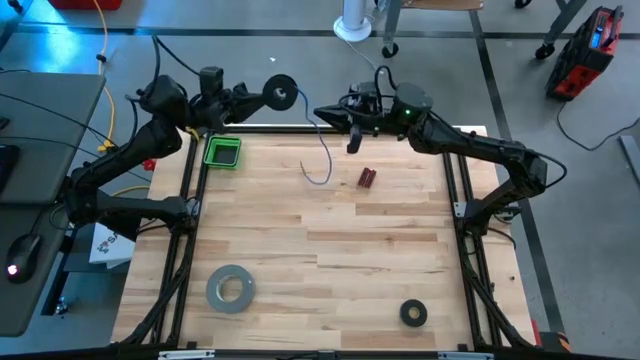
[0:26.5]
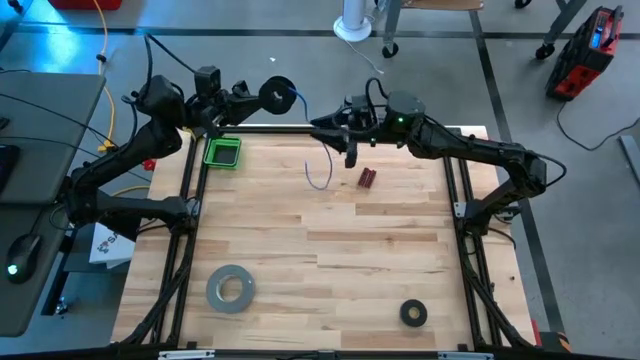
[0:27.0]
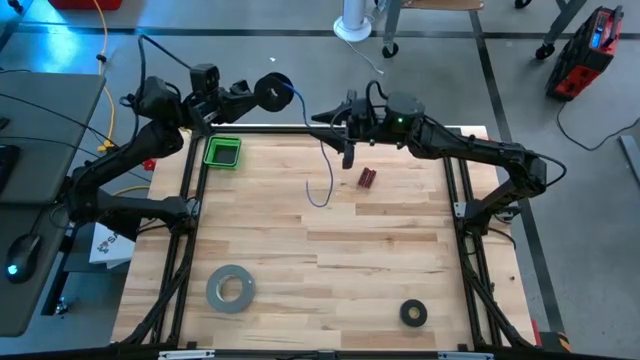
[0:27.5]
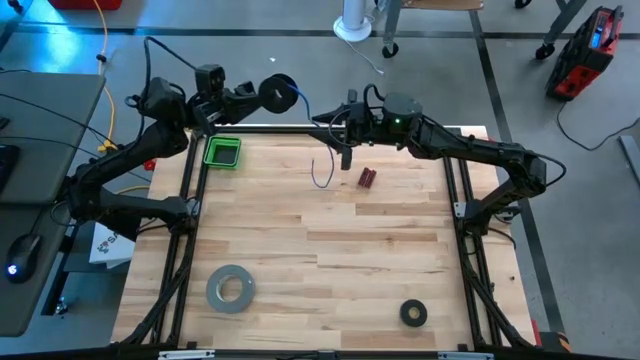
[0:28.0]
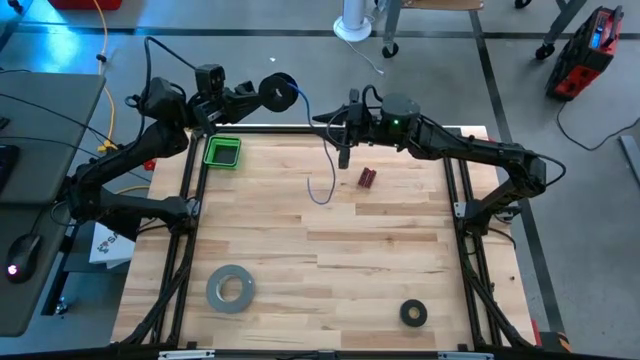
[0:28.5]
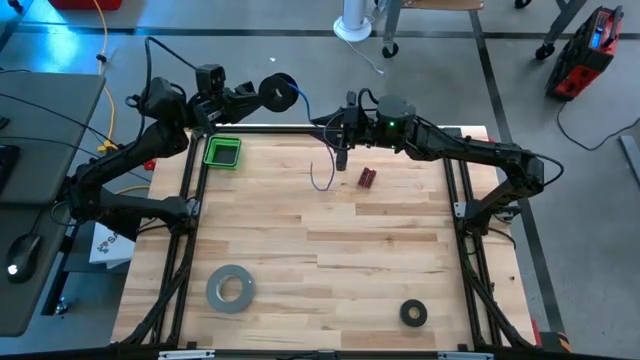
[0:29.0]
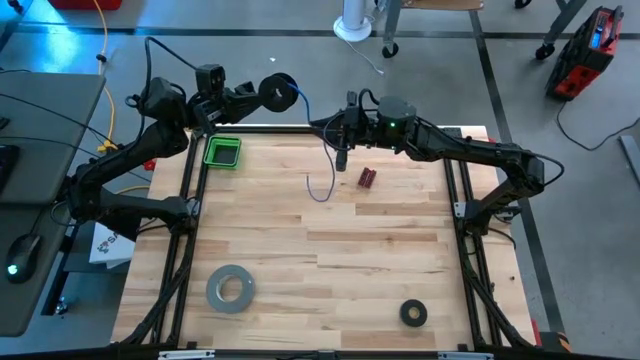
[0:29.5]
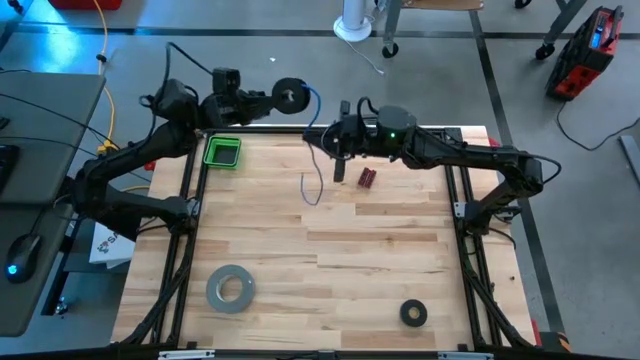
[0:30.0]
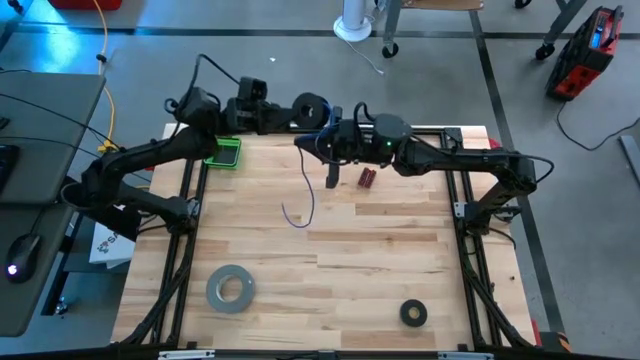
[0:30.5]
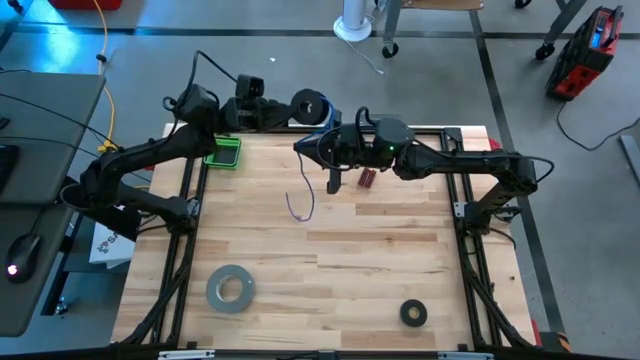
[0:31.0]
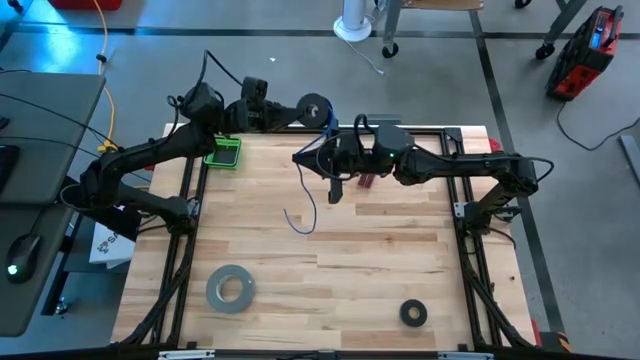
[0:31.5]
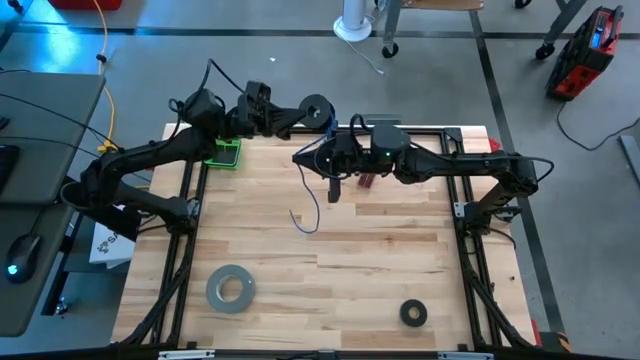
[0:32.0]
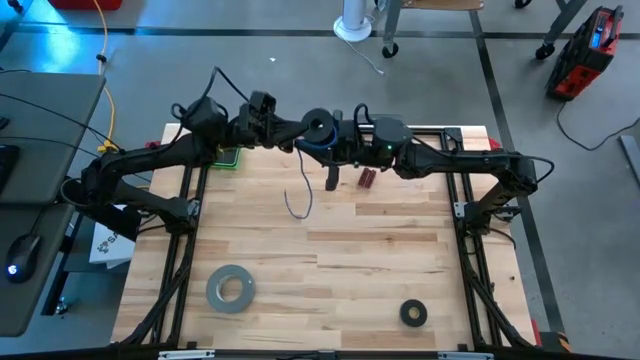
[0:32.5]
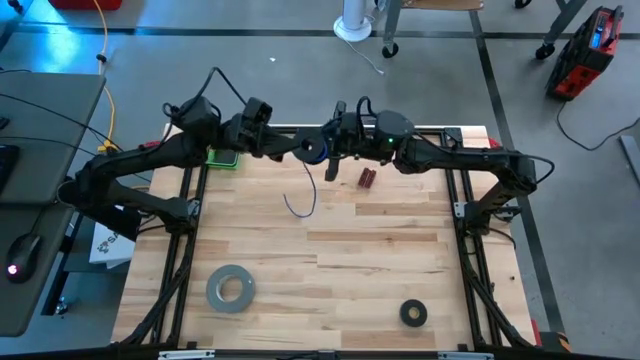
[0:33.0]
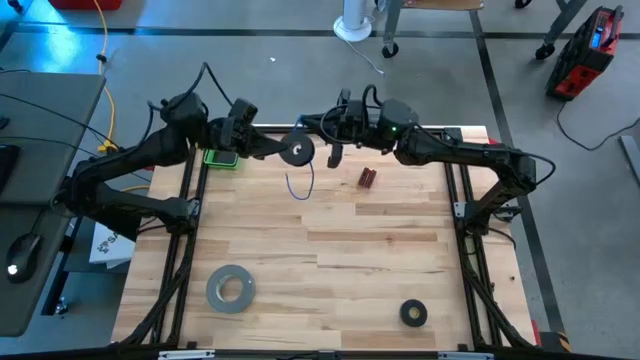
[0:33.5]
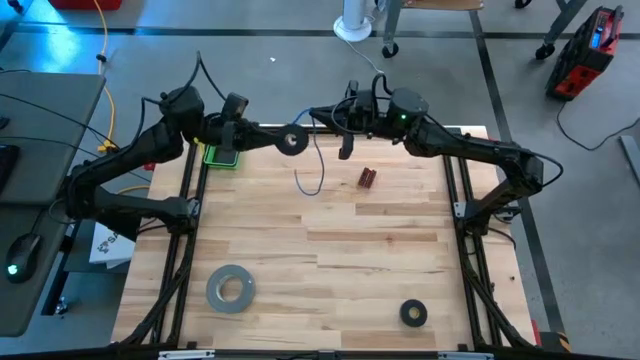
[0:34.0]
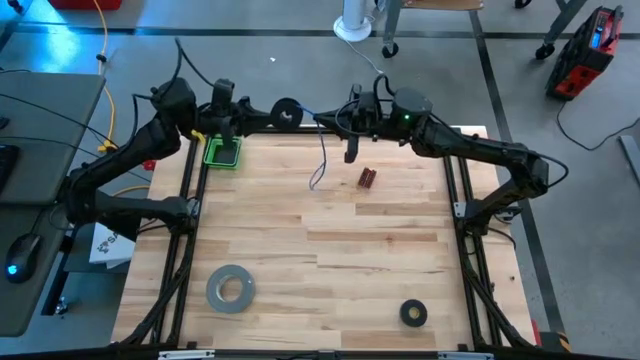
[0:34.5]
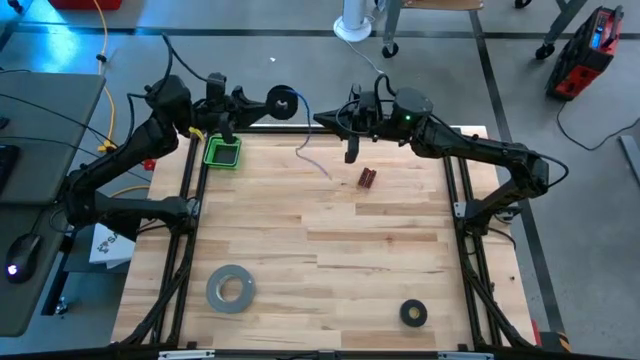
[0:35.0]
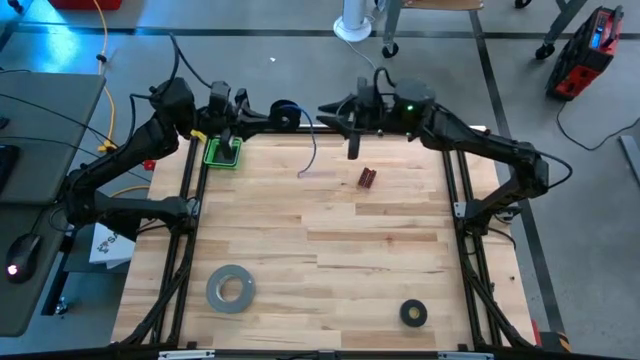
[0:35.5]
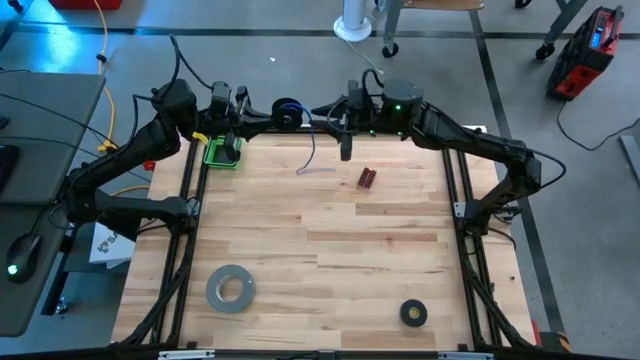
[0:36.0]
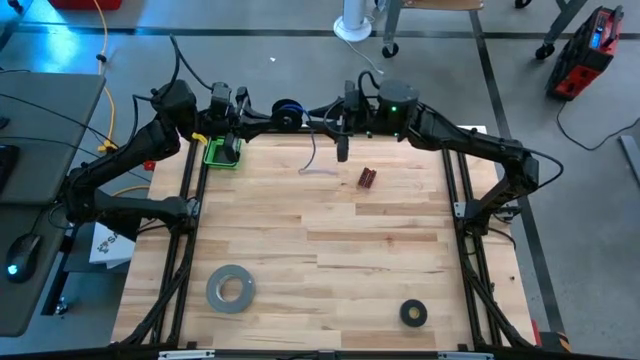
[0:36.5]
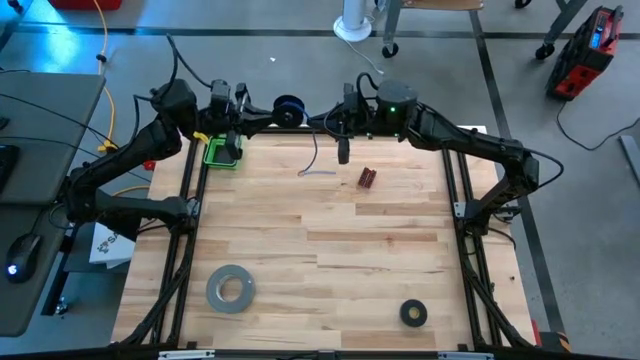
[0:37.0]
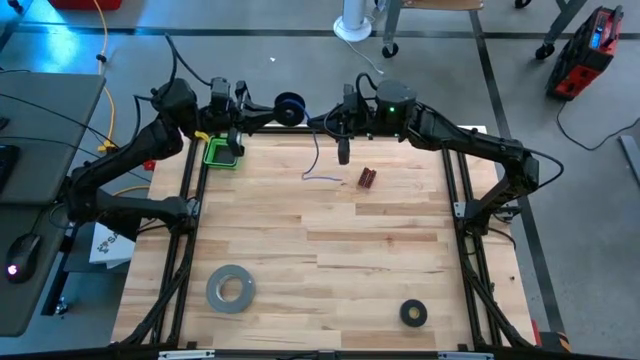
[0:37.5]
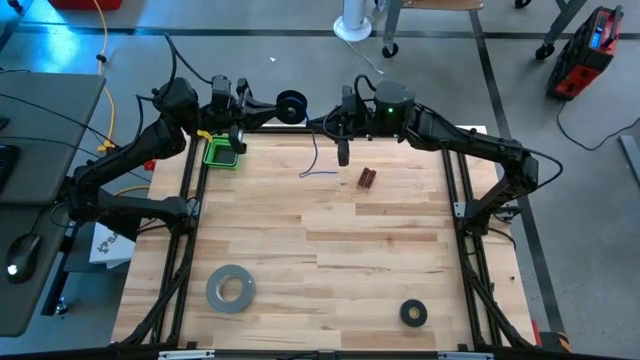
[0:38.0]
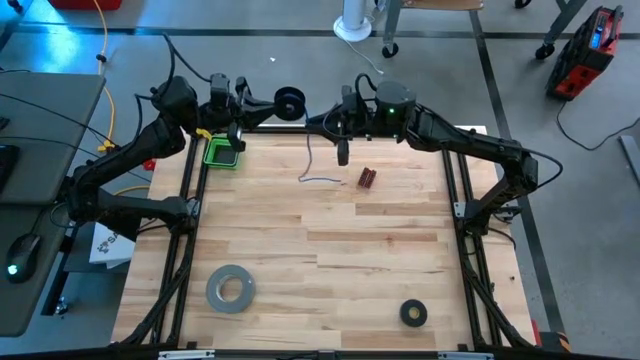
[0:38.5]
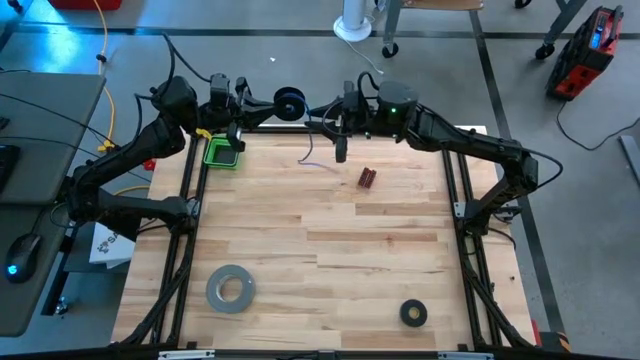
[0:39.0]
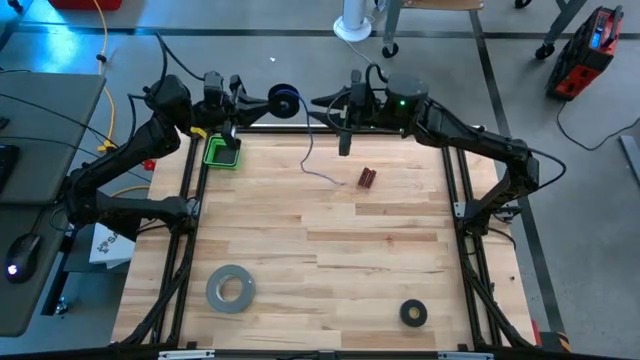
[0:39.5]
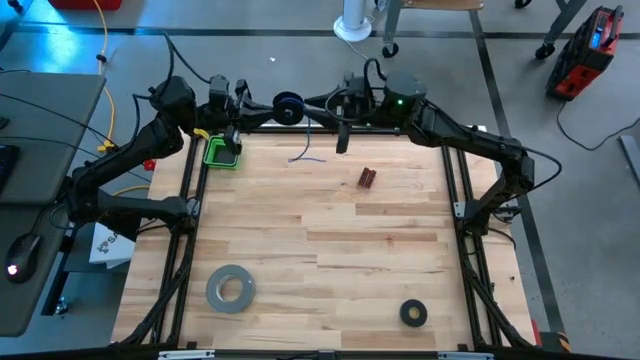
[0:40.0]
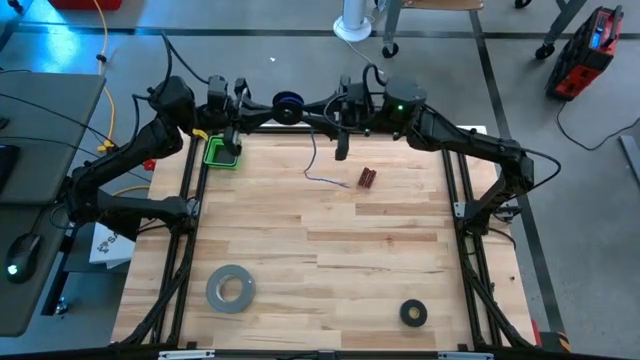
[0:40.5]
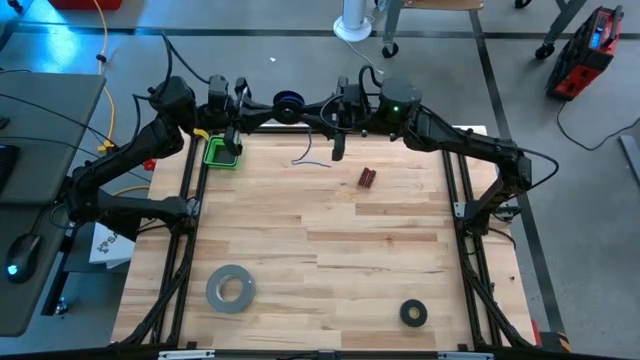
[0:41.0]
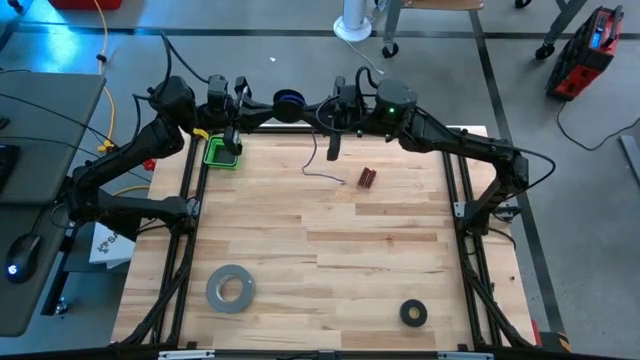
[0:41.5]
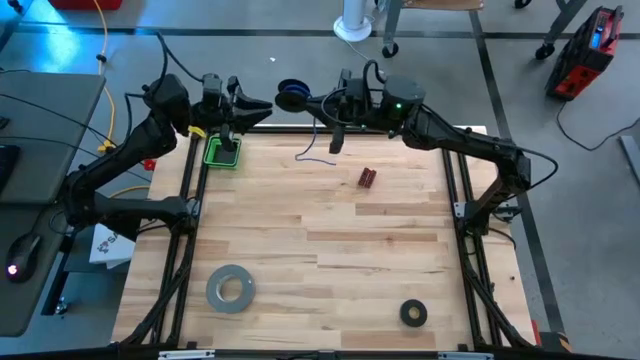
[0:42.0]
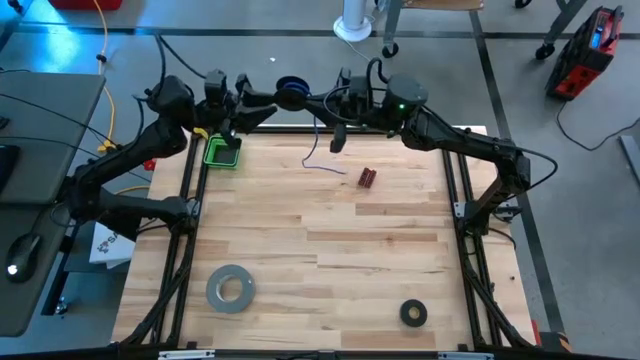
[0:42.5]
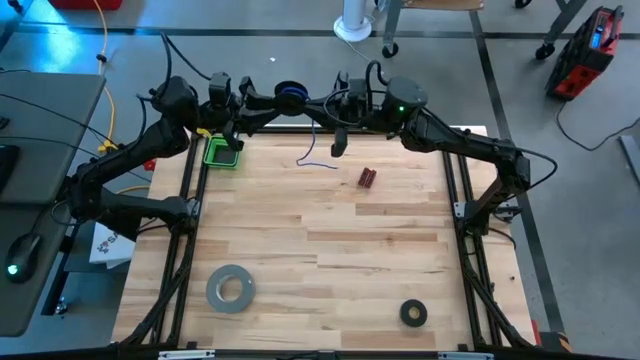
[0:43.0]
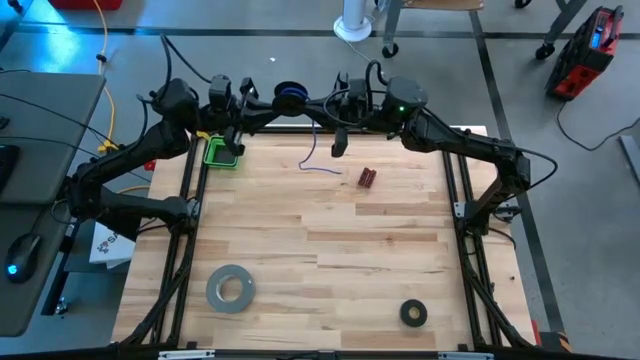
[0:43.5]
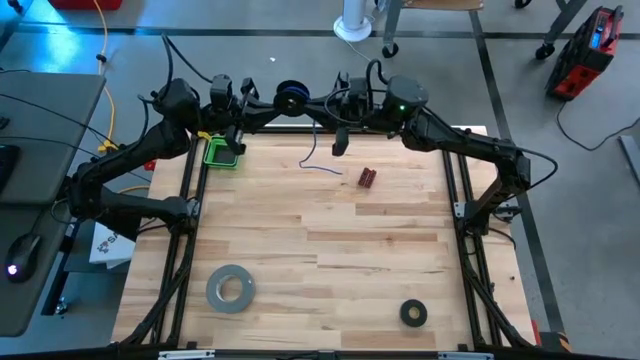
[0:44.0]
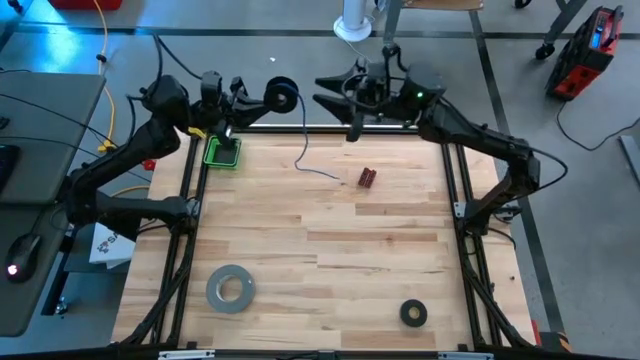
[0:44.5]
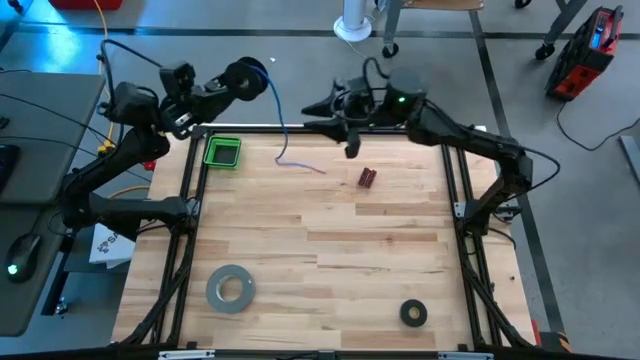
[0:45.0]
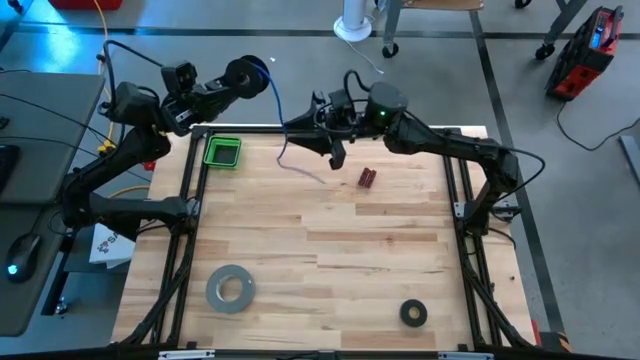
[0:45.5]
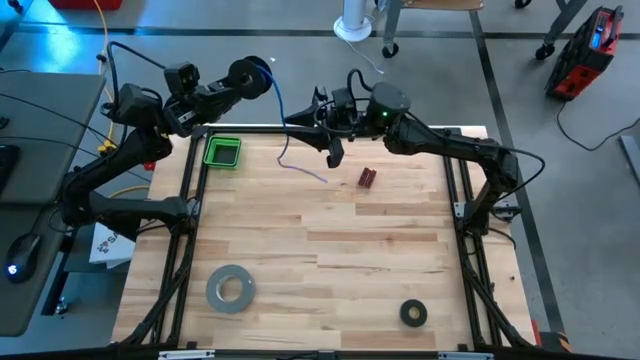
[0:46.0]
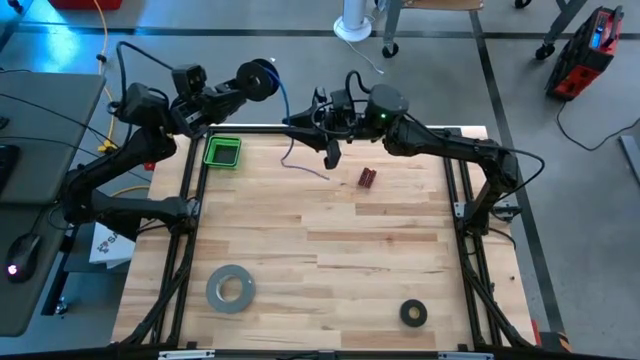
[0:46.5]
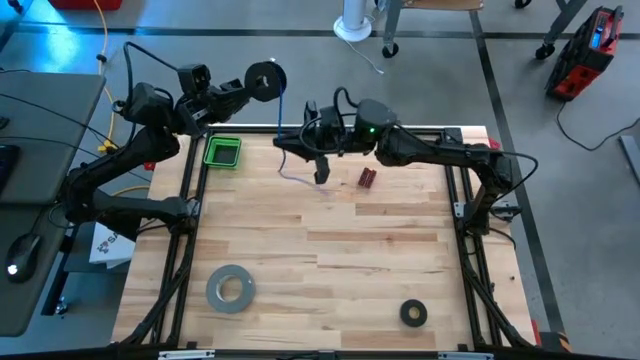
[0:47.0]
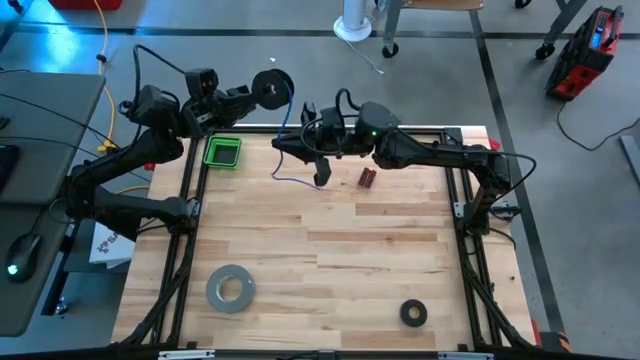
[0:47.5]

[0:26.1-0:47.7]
Task: Coil cords
Coil the blue wire onto the spool

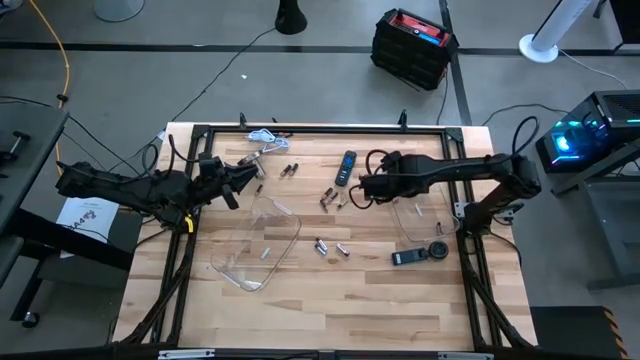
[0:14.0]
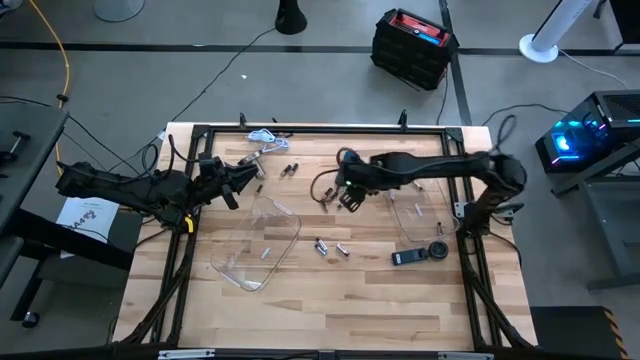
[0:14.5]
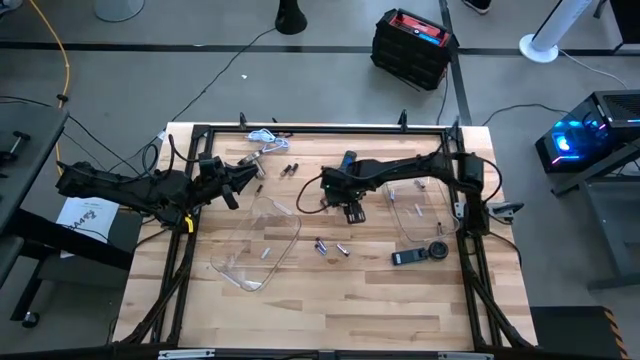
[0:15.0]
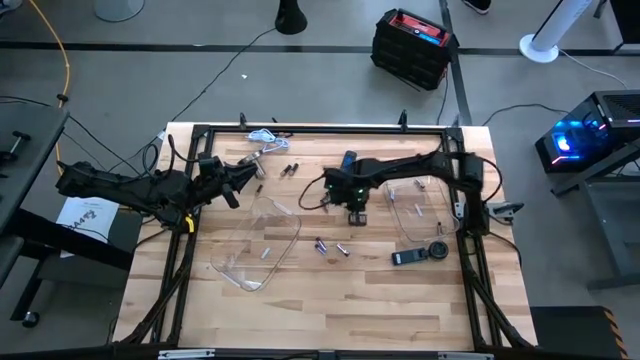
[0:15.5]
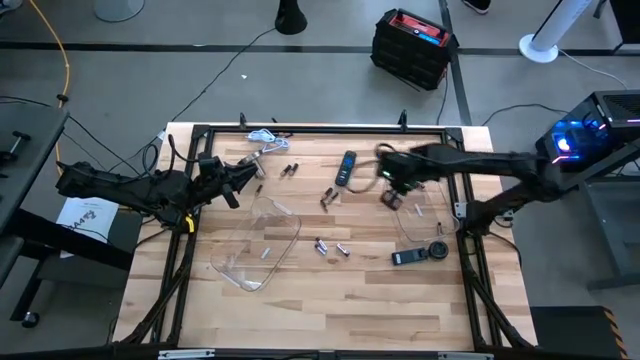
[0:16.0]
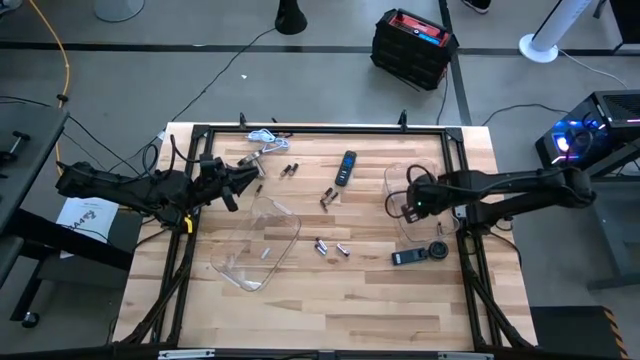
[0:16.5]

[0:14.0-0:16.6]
Task: Sort batteries
Put the white battery into the right transparent bin
